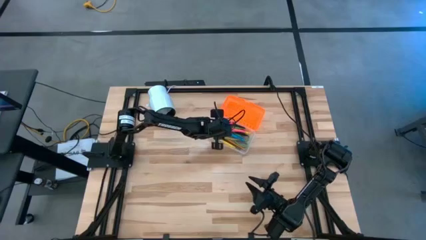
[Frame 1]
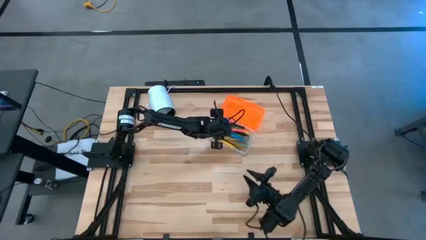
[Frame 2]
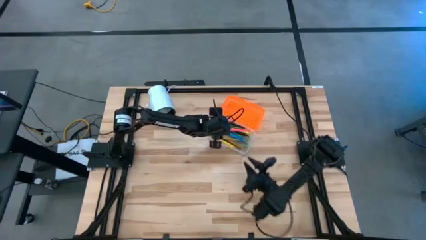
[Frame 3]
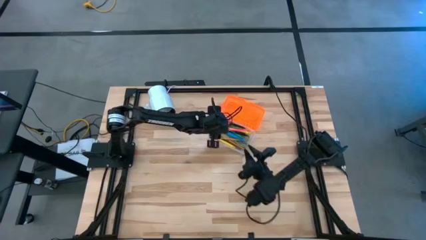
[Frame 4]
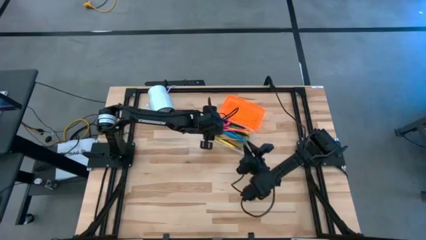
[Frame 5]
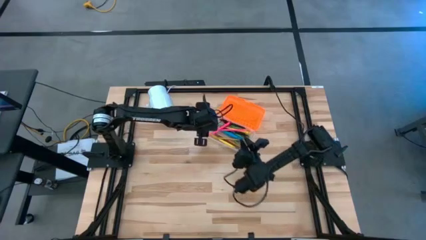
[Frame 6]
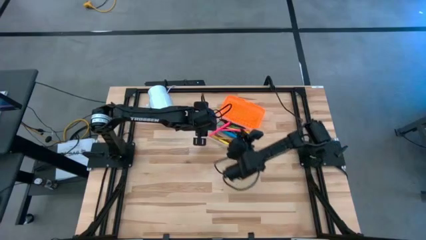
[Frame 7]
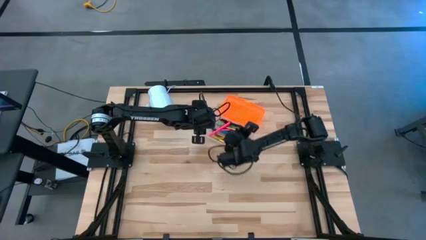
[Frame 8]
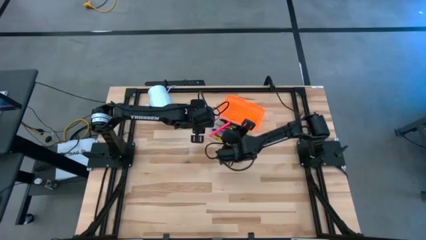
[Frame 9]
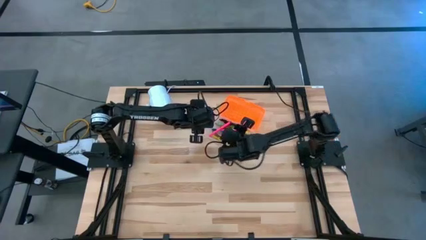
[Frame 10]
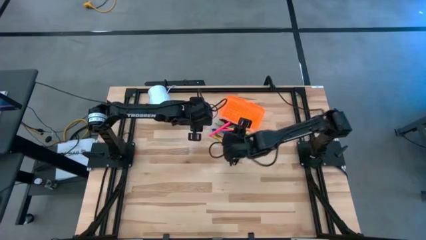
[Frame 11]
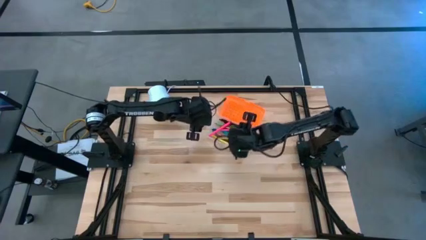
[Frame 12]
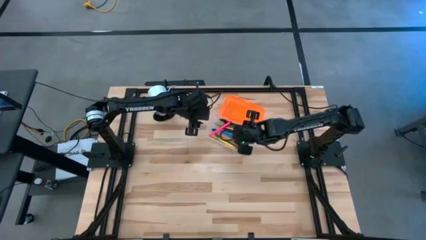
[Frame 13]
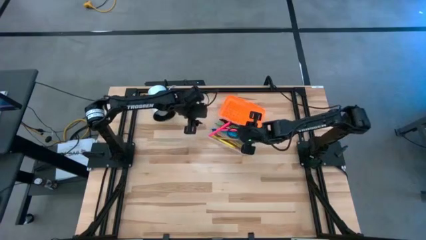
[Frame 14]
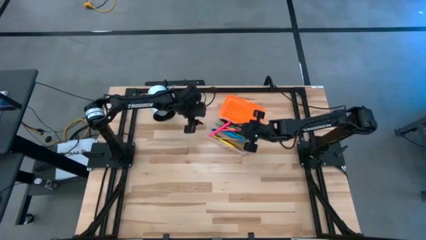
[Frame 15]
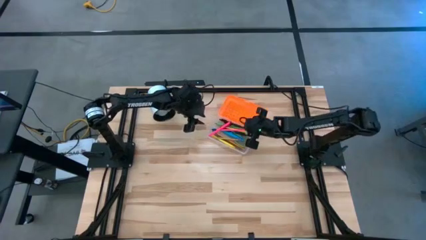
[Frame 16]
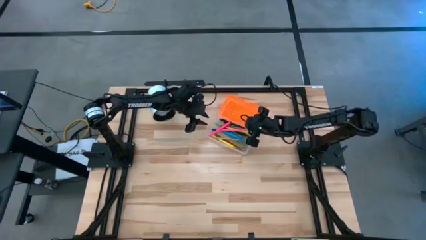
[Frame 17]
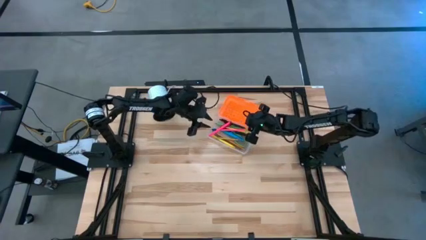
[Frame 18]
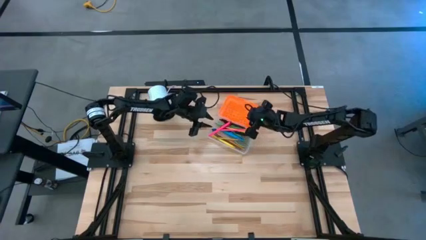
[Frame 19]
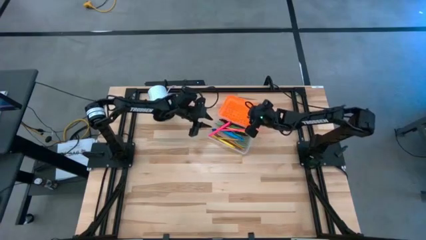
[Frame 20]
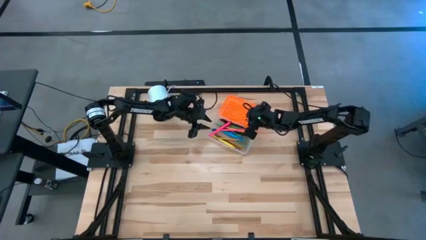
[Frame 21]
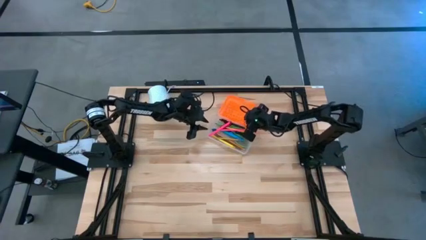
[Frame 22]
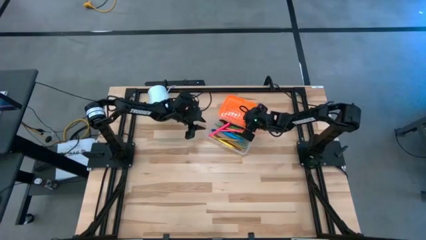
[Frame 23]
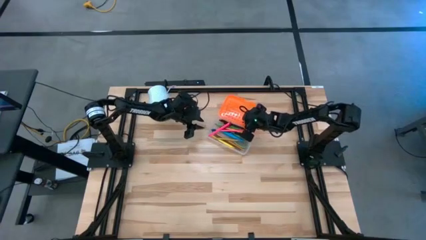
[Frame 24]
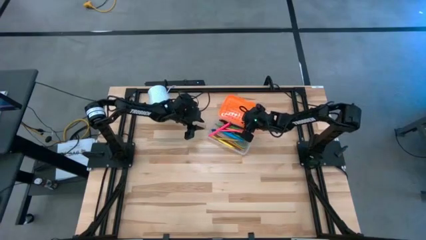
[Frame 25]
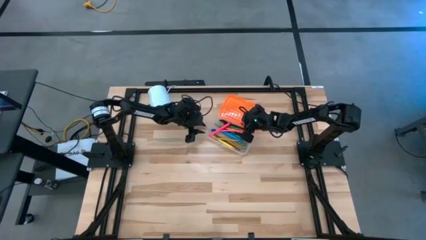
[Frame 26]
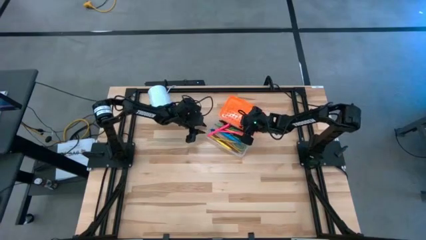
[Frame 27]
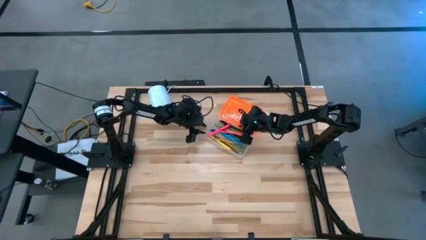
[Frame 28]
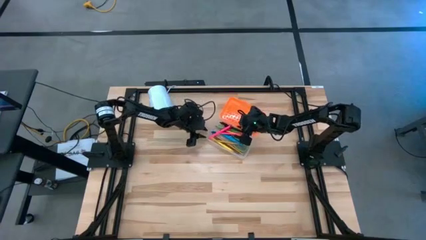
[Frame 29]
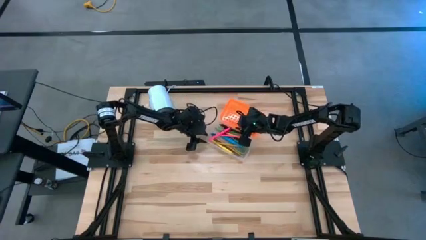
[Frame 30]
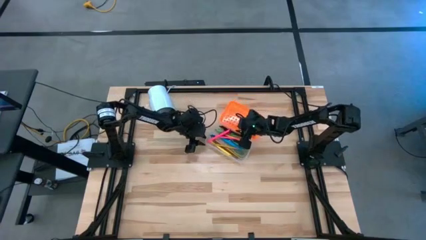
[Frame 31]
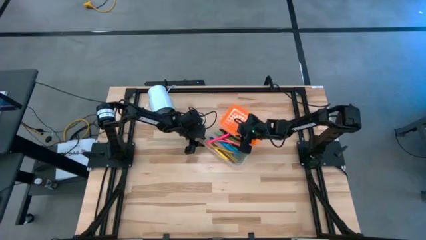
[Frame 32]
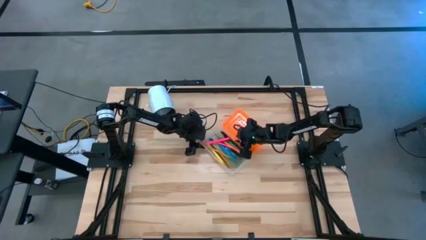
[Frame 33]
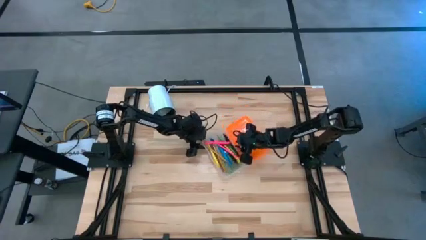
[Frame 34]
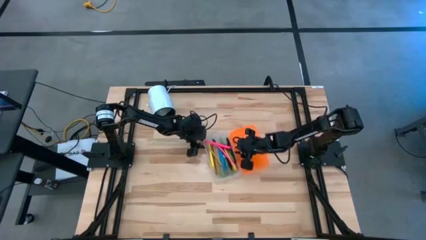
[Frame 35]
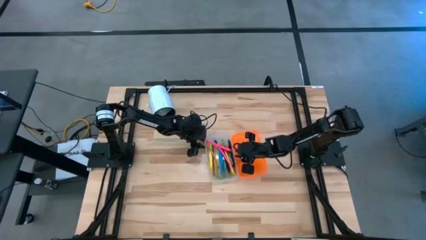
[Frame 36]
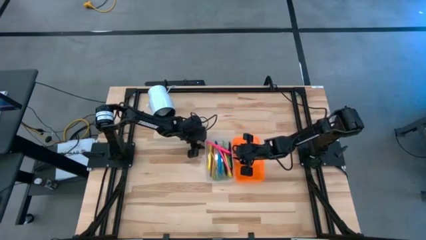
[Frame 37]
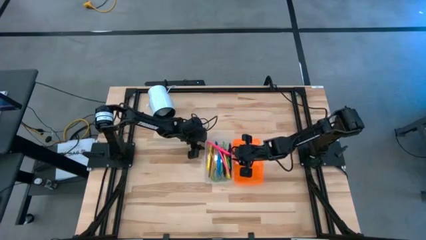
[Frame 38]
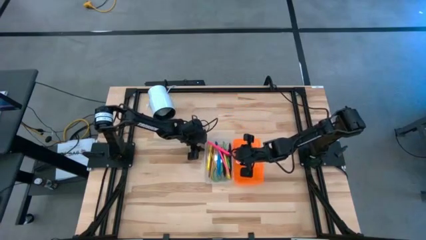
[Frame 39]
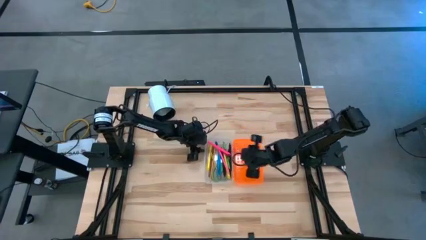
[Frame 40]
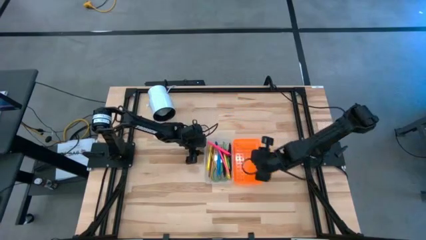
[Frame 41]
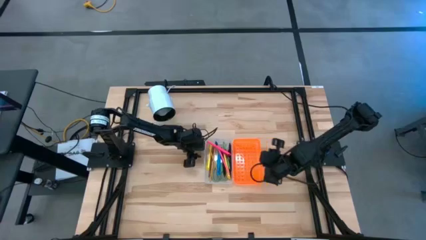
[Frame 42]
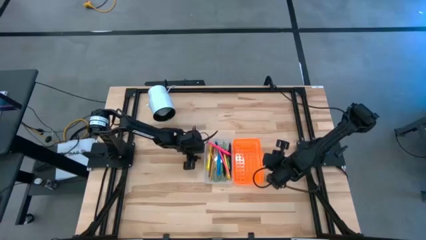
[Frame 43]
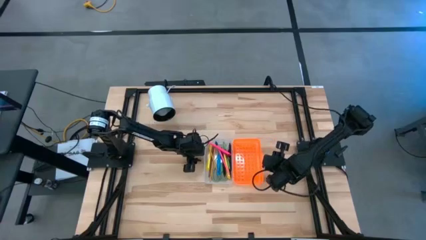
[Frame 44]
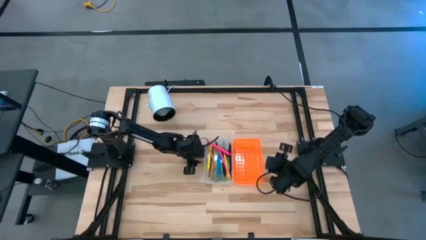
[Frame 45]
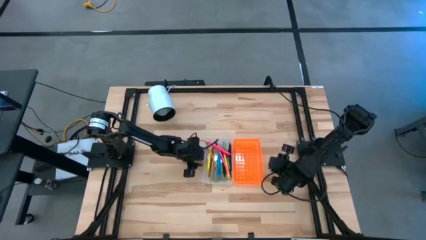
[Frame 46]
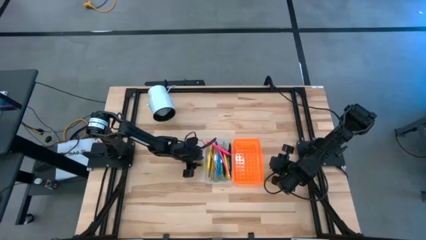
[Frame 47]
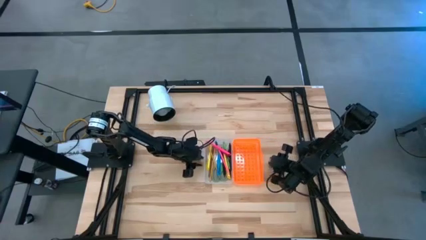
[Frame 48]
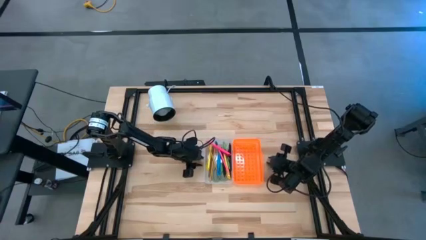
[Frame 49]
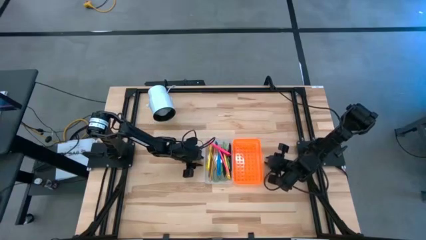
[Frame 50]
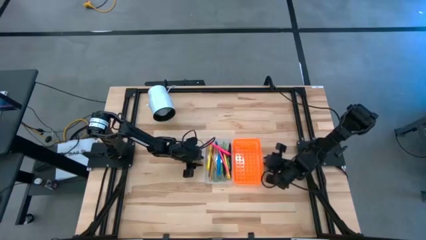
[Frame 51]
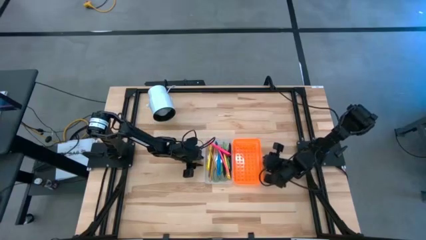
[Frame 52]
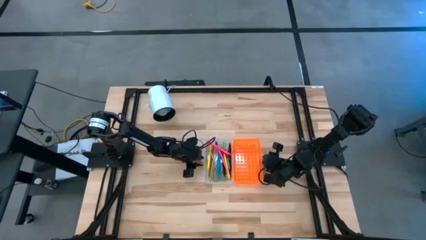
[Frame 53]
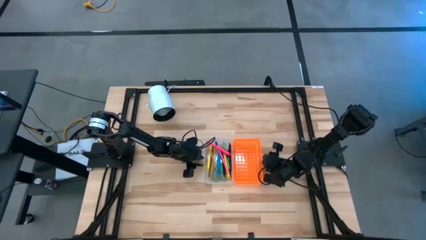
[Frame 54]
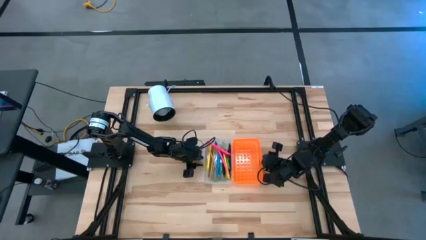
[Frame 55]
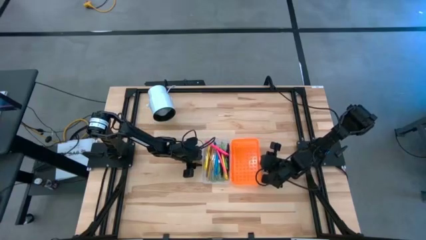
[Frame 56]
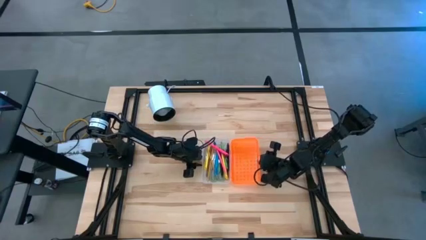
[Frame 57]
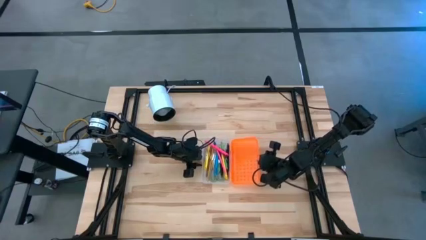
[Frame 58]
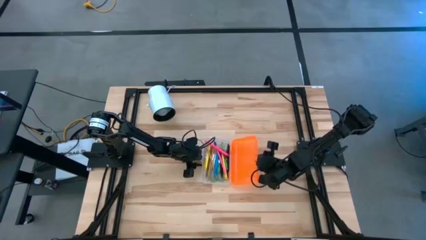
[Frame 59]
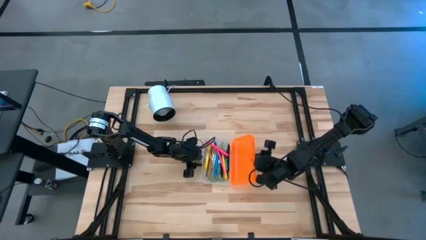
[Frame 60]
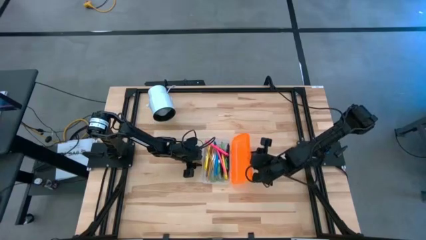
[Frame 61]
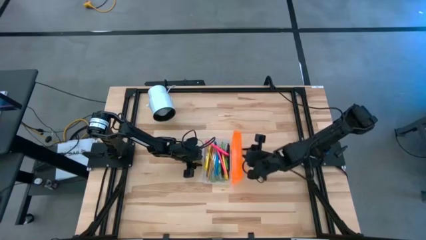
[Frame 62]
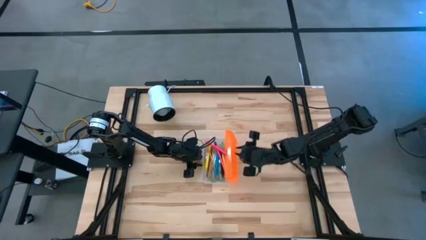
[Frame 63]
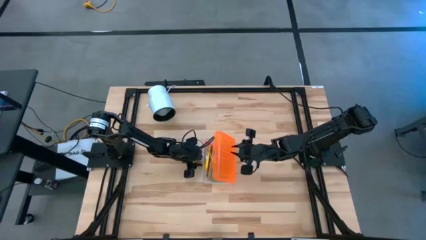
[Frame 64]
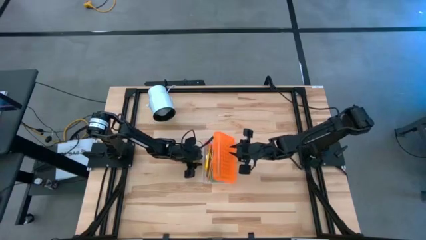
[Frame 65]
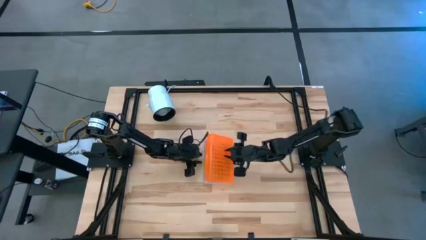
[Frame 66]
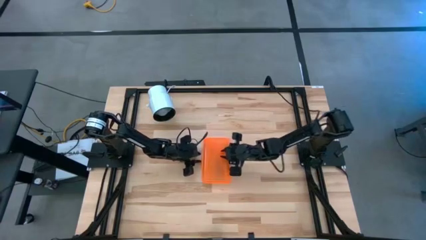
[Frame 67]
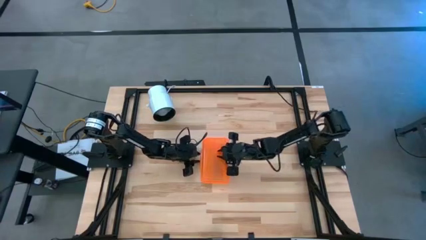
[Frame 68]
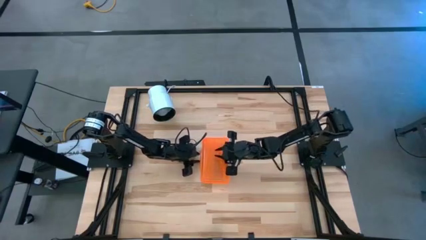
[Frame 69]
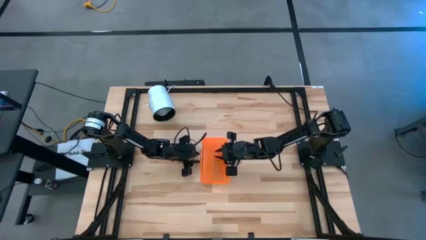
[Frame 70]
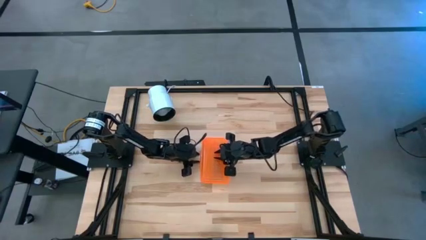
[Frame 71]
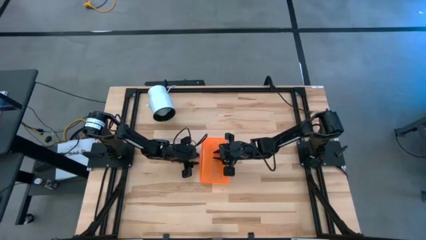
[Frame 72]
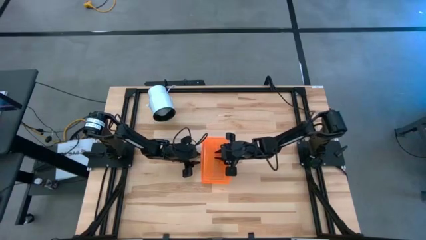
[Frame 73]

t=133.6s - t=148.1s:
Task: Pick & place school supplies into a supply box
Close the supply box
